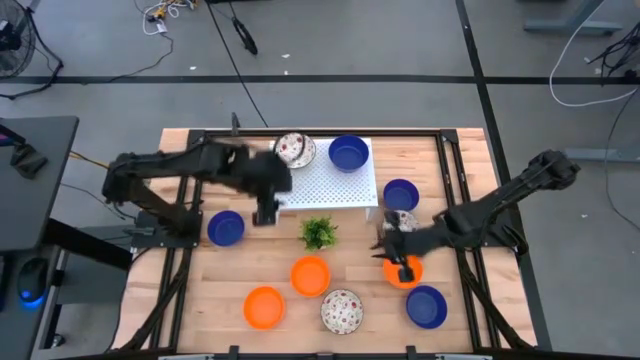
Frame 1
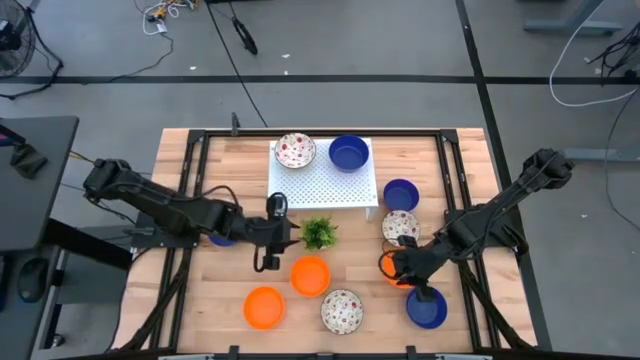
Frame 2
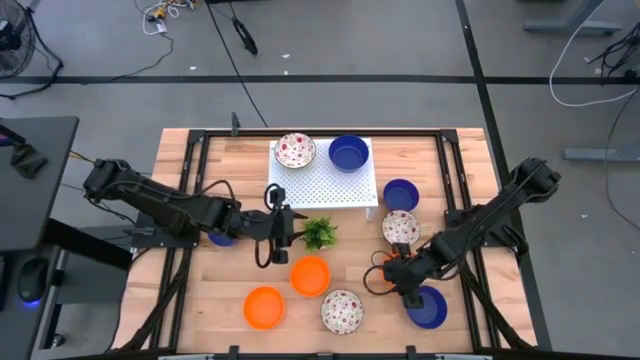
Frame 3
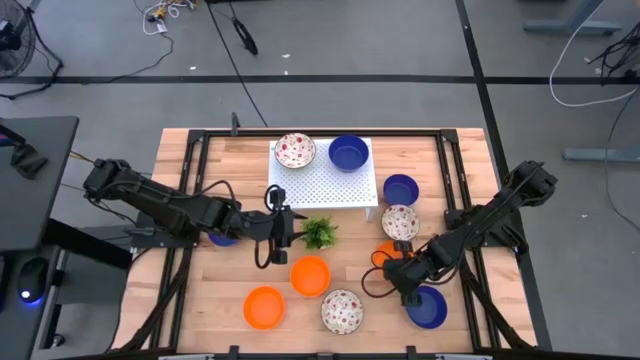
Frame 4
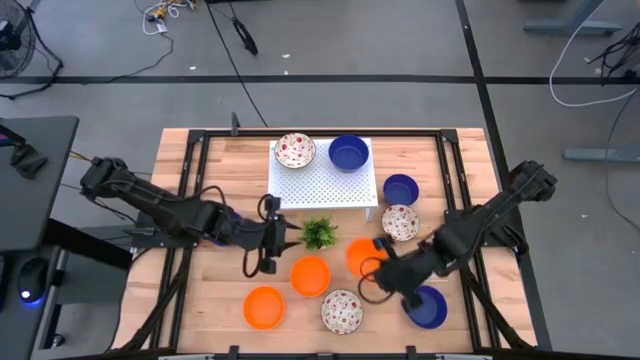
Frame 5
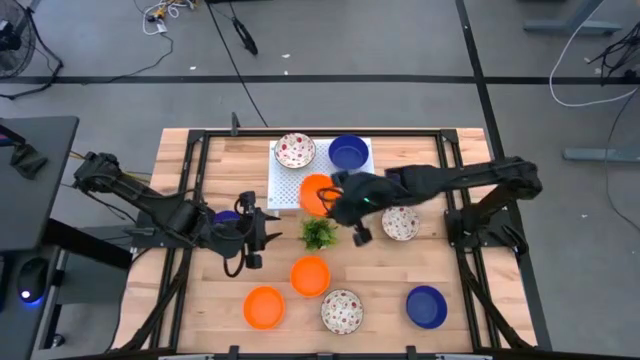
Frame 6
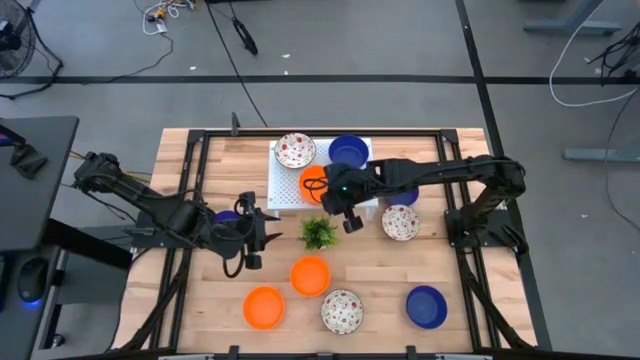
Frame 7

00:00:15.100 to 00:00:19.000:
Task: Pick & Place Mini bowls
Put the orange bowl on the shelf

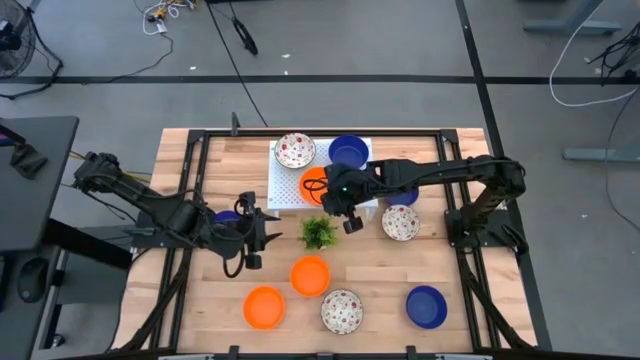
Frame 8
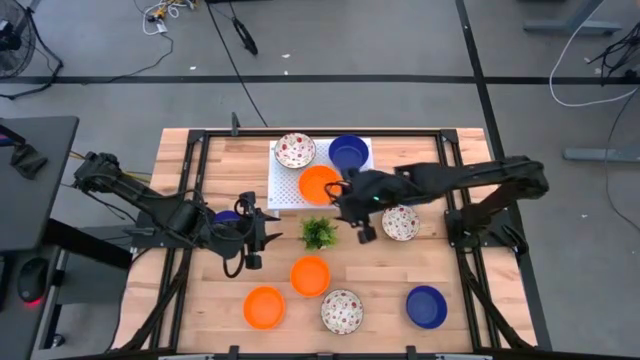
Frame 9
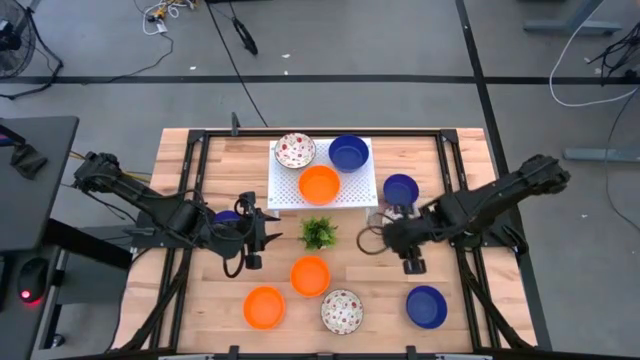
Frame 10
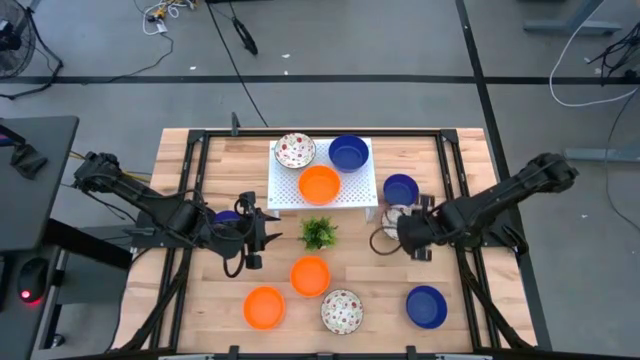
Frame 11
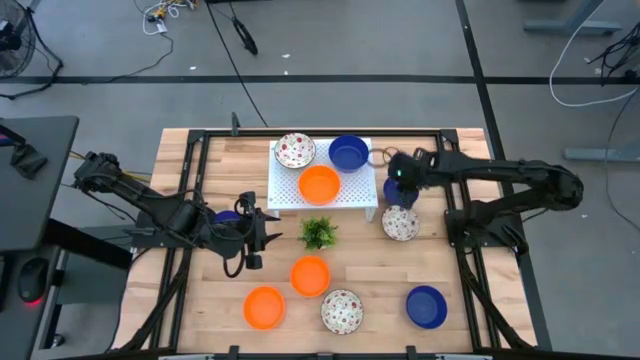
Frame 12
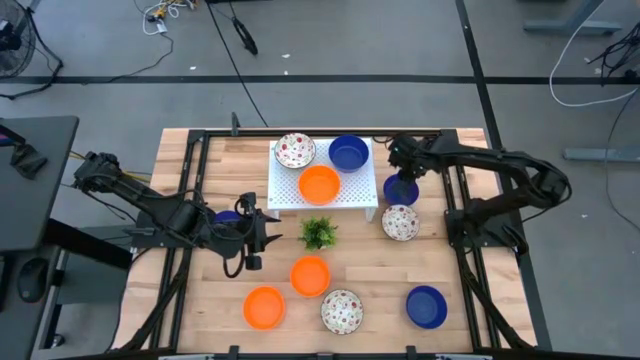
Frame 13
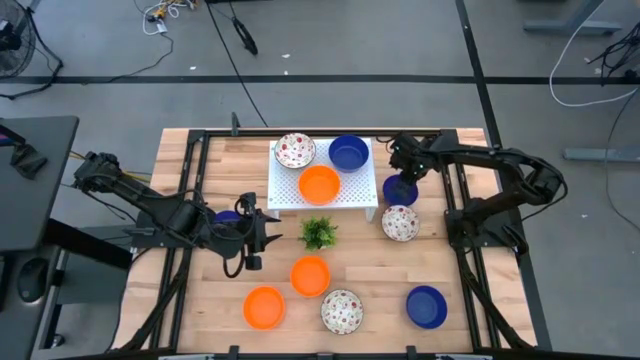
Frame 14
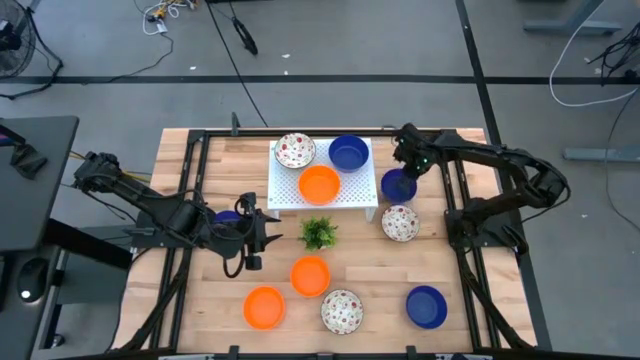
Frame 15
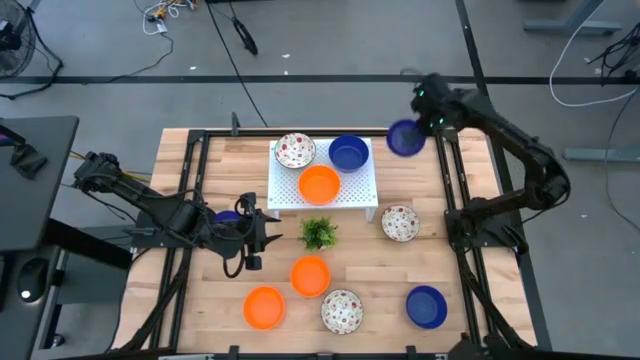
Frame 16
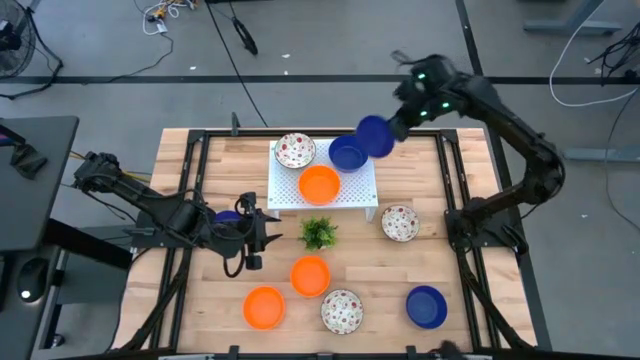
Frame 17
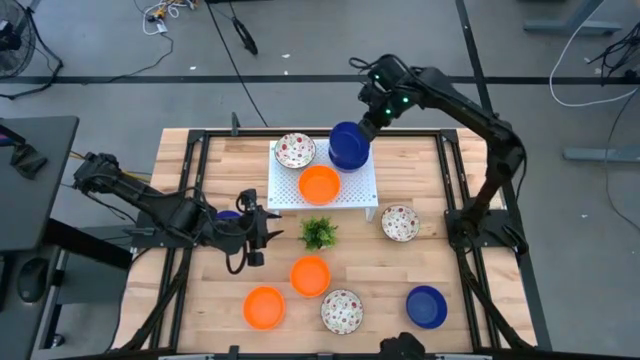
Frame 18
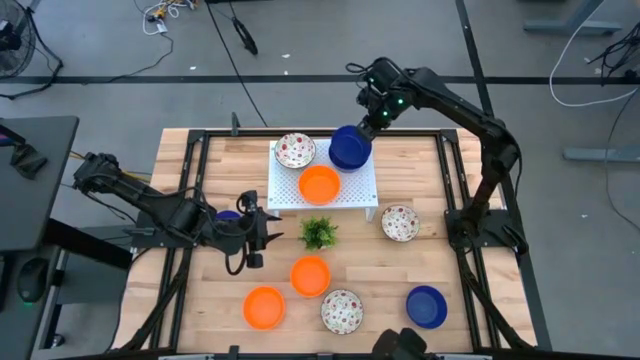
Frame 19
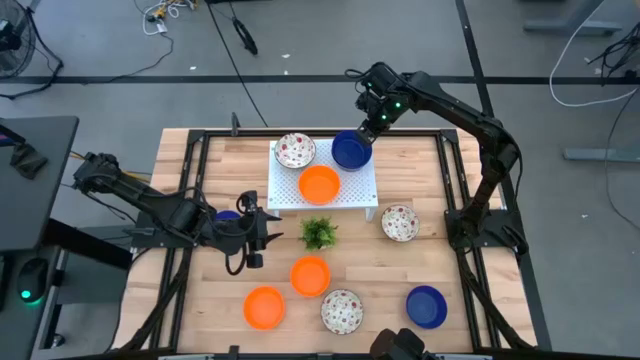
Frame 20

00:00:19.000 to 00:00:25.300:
Stack the blue bowl on top of the blue bowl on the shelf

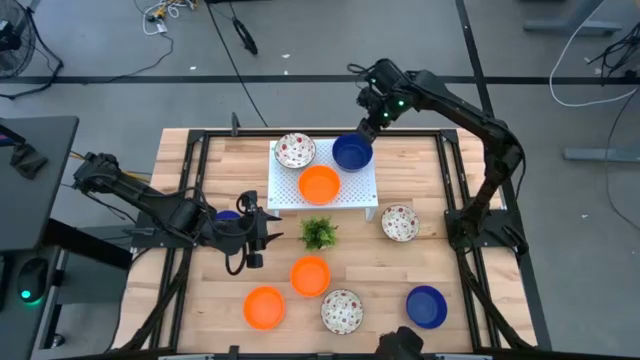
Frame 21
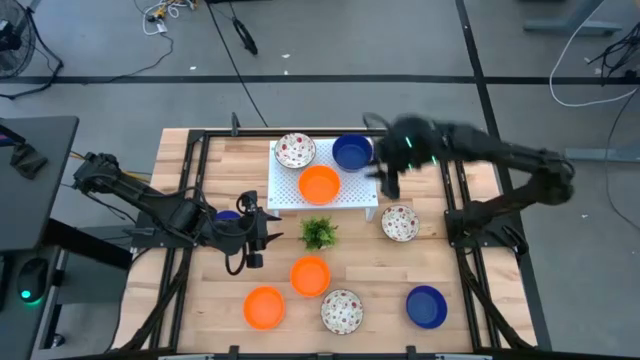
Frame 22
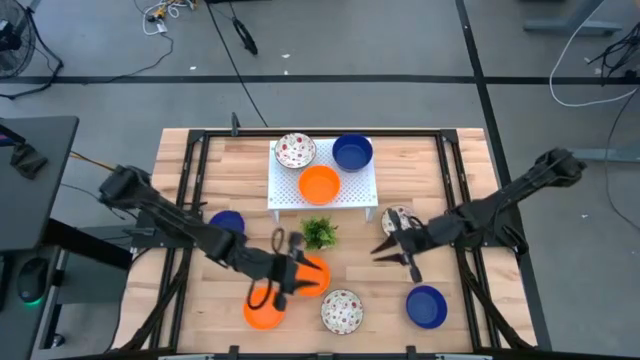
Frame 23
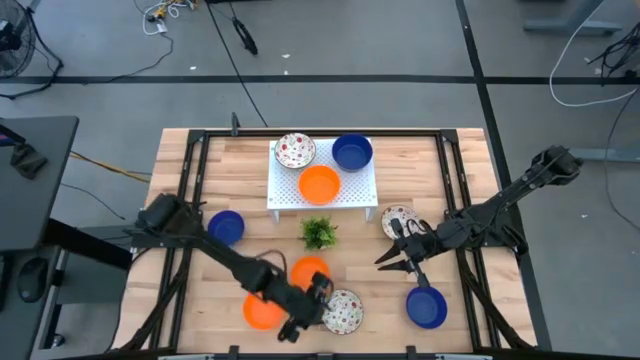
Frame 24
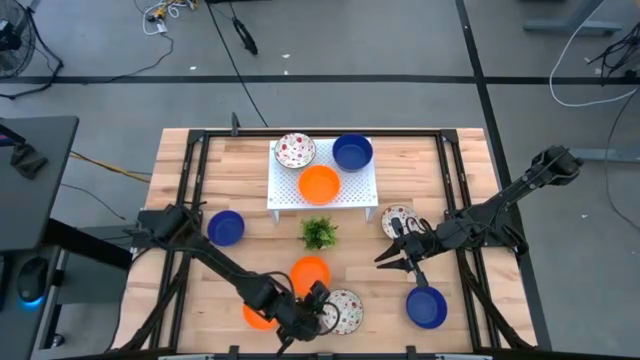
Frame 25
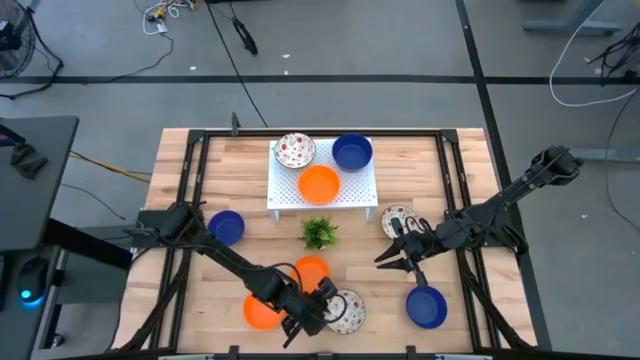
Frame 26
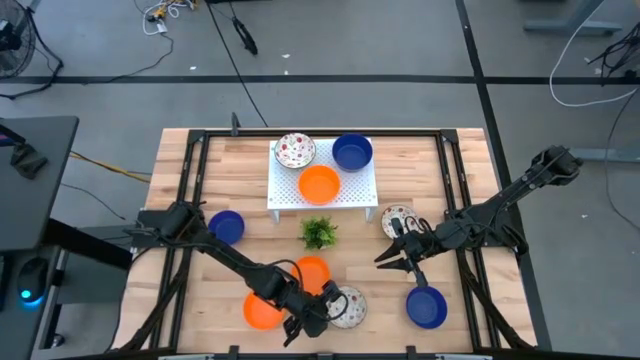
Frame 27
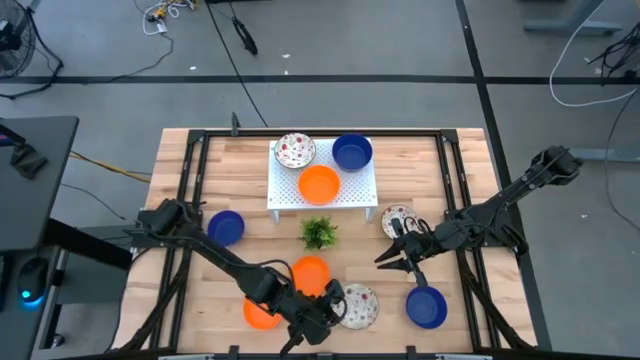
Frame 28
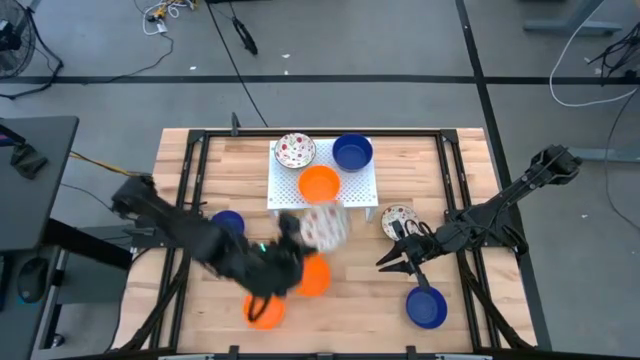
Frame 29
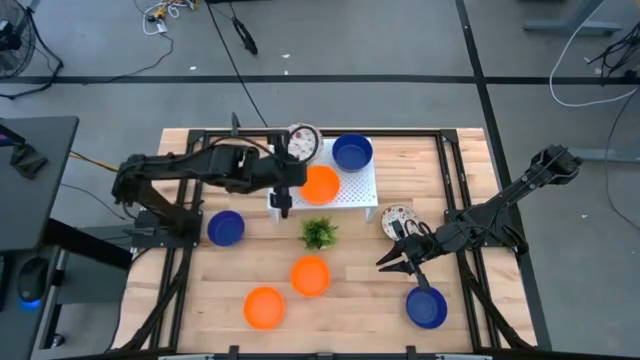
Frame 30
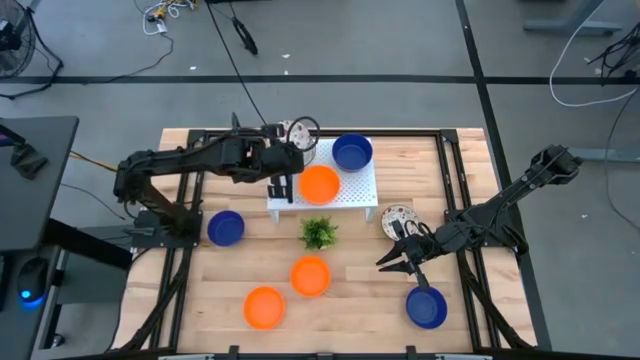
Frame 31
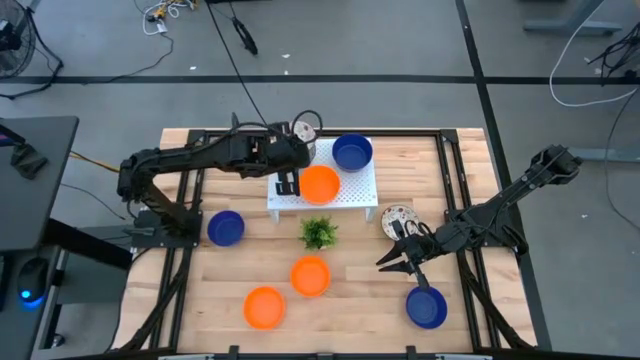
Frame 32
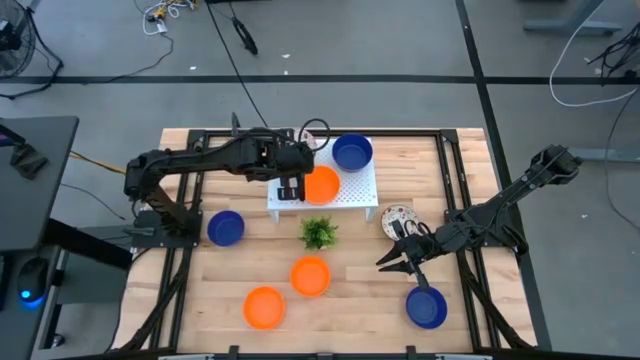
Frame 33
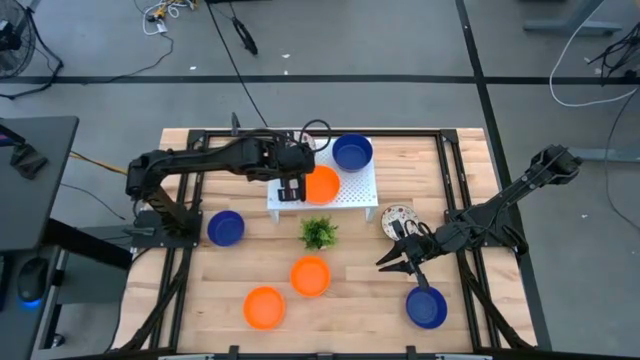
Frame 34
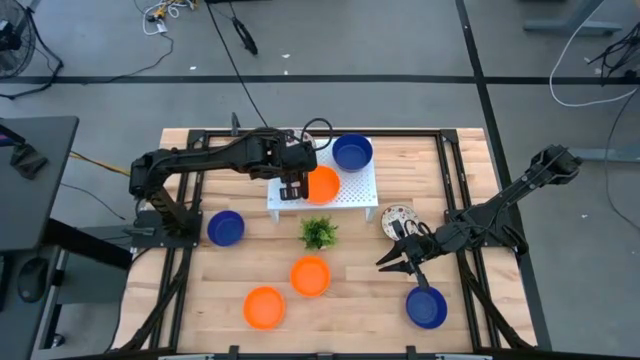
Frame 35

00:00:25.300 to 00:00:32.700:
Stack the white bowl on top of the white bowl on the shelf

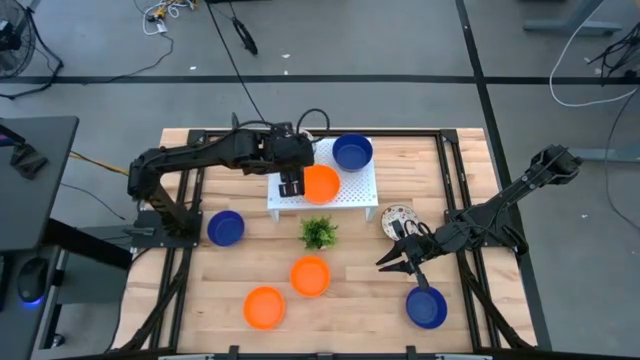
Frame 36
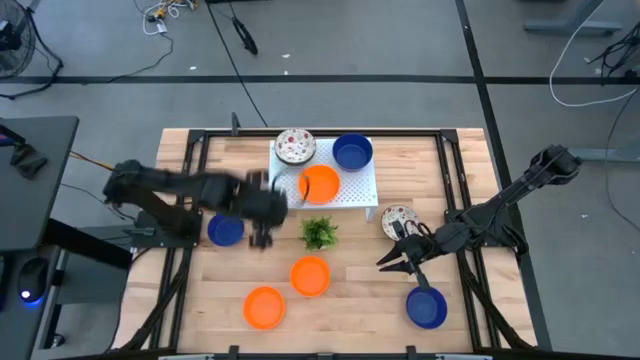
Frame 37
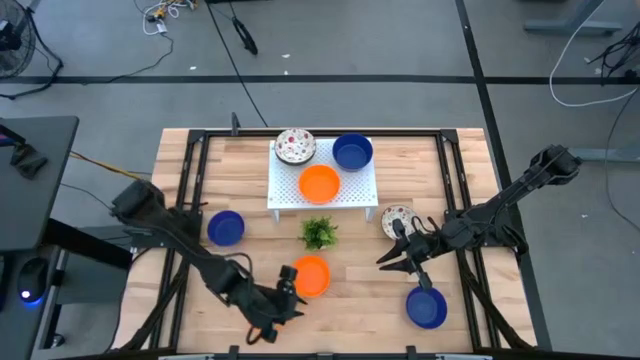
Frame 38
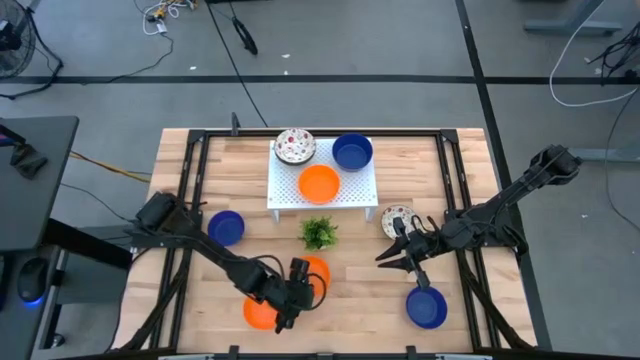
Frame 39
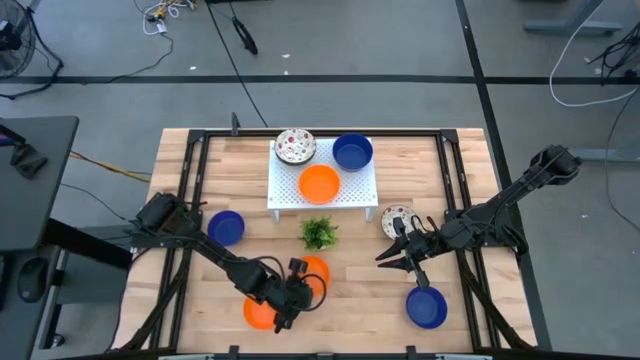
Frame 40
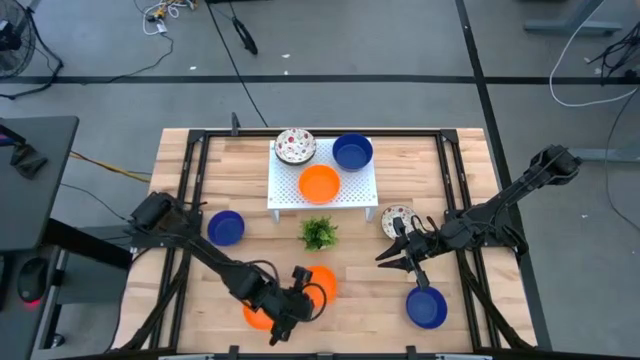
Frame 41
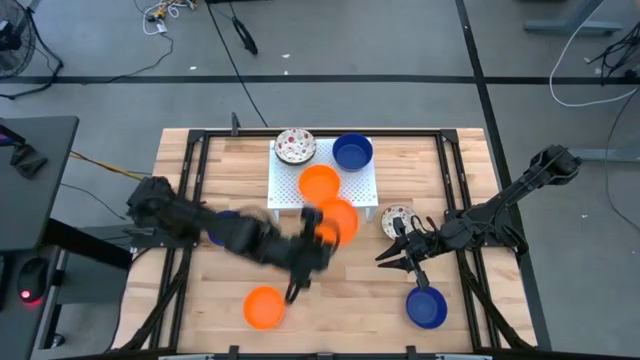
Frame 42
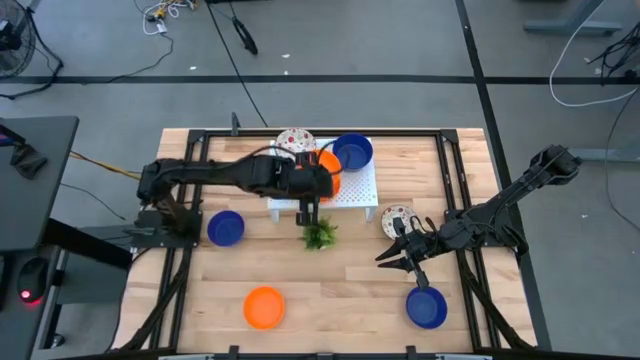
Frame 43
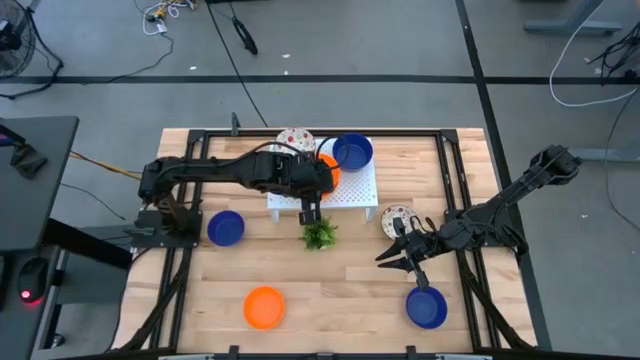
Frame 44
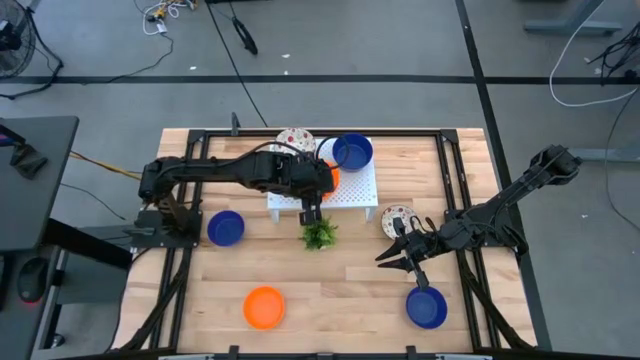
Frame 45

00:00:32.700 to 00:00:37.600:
Stack the orange bowl on top of the orange bowl on the shelf
